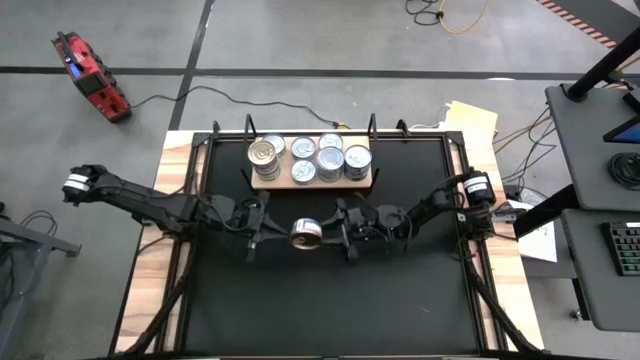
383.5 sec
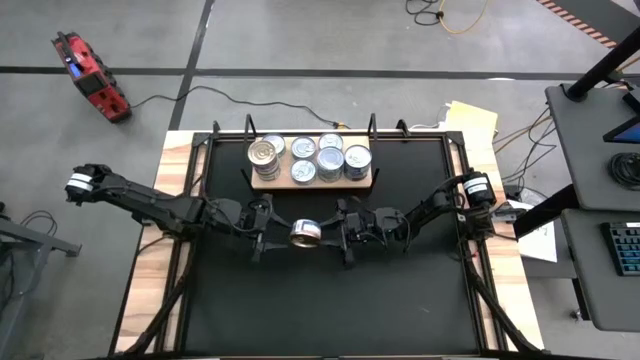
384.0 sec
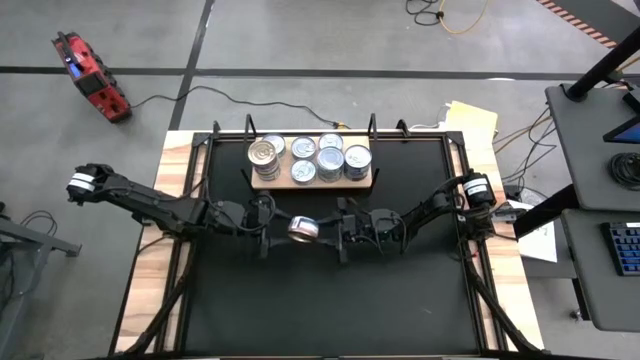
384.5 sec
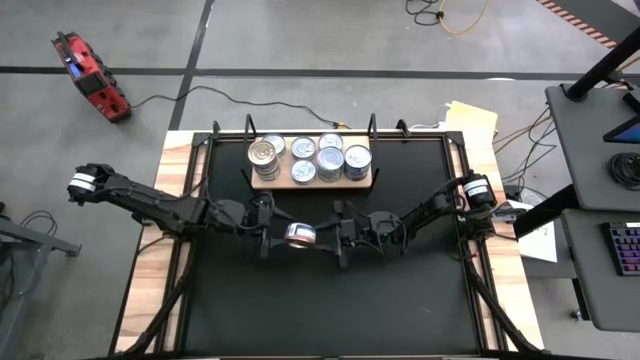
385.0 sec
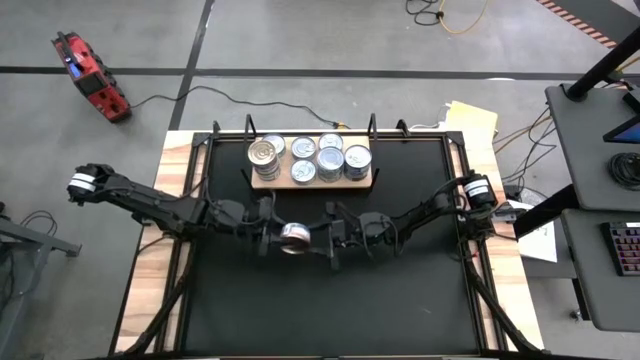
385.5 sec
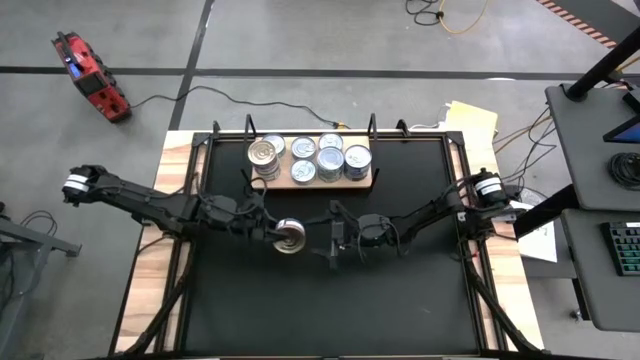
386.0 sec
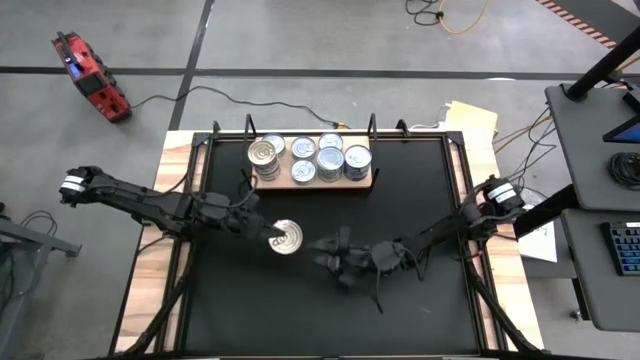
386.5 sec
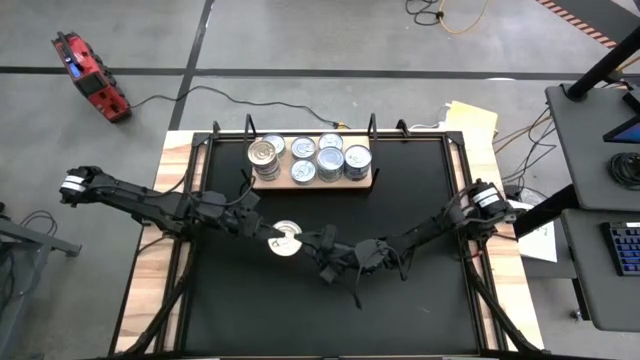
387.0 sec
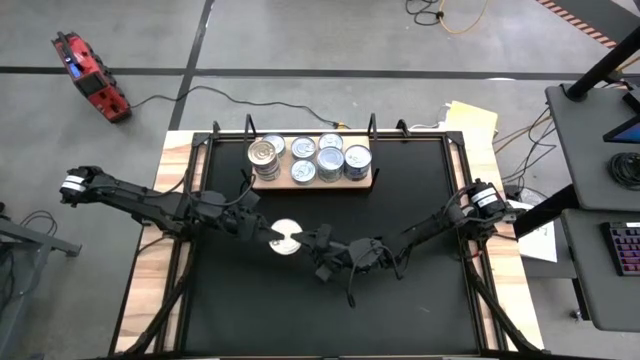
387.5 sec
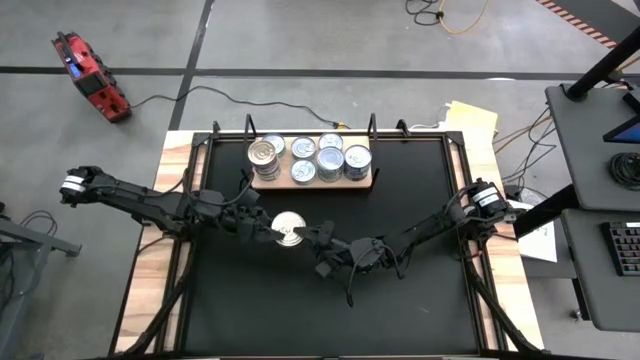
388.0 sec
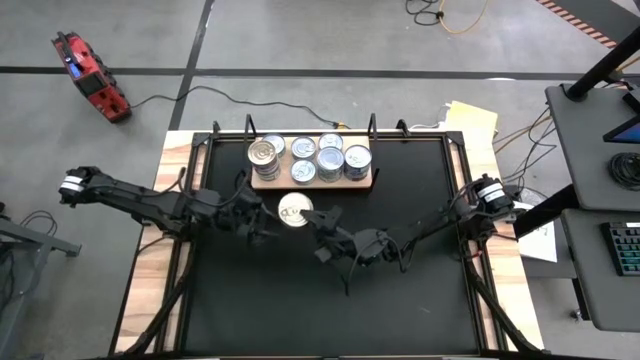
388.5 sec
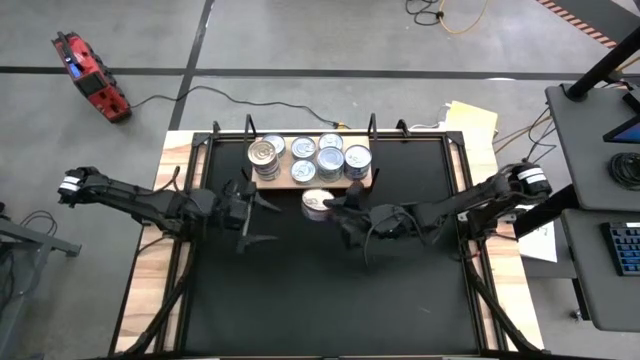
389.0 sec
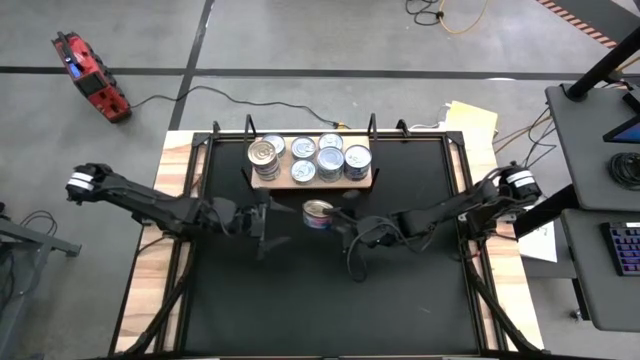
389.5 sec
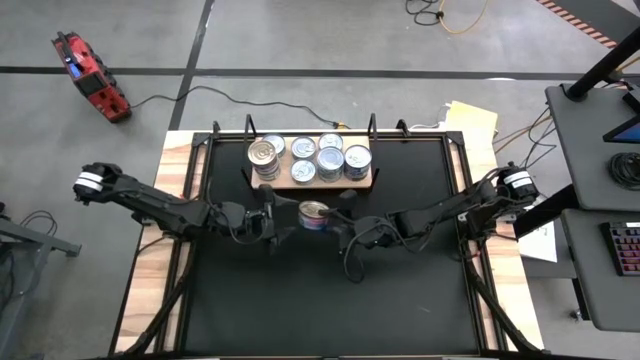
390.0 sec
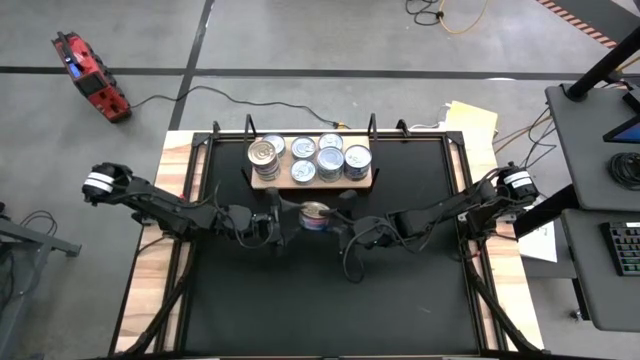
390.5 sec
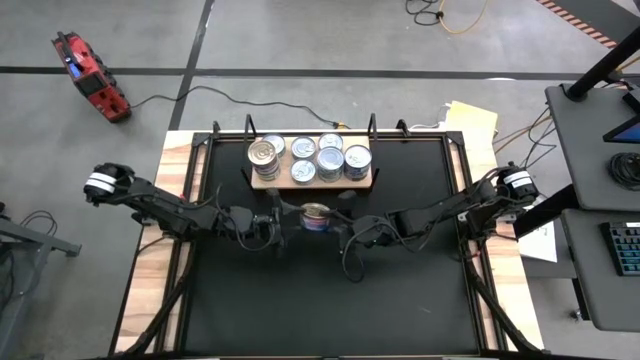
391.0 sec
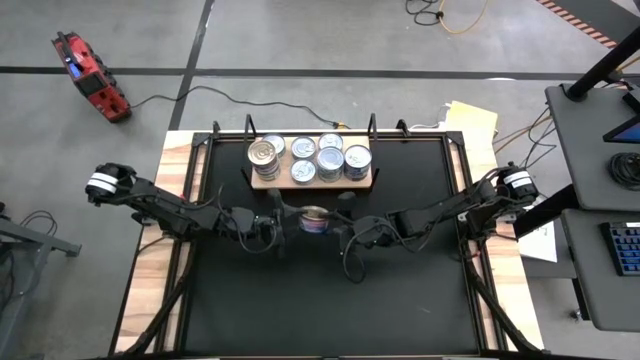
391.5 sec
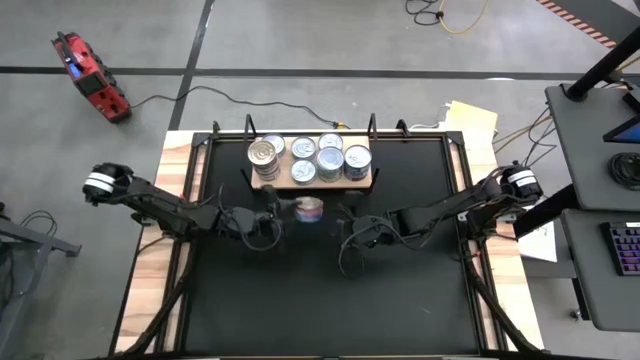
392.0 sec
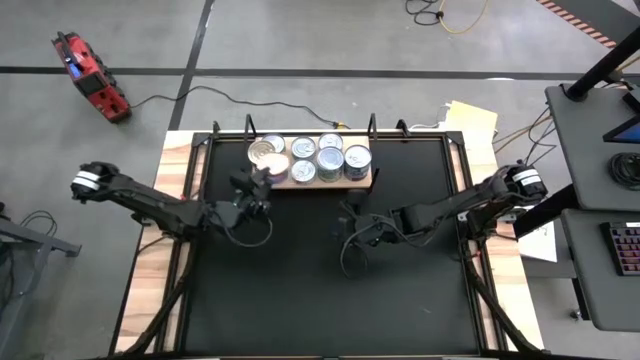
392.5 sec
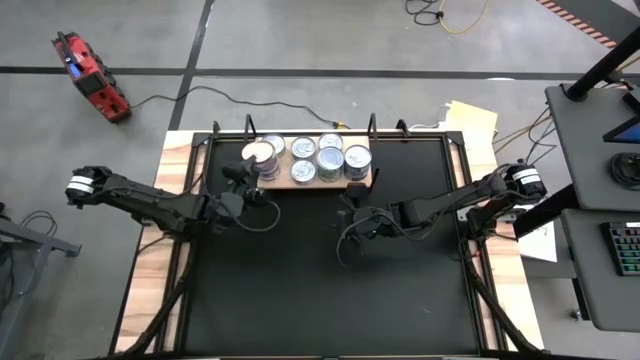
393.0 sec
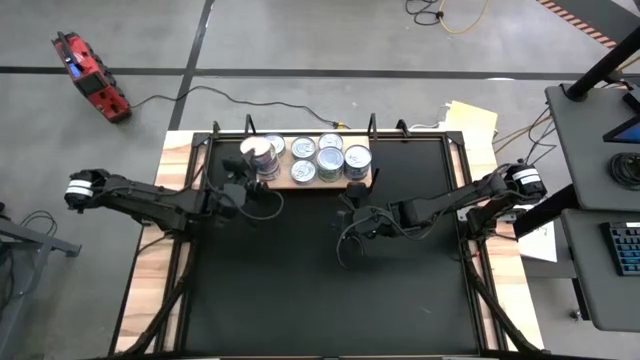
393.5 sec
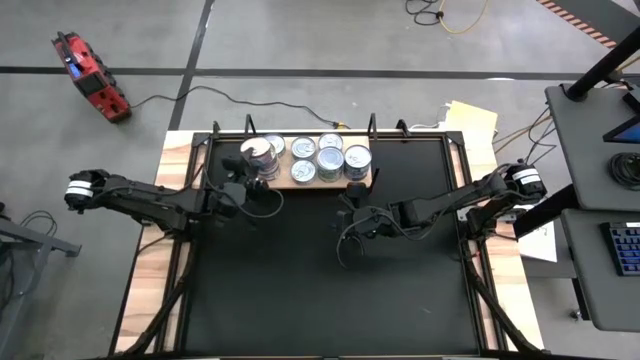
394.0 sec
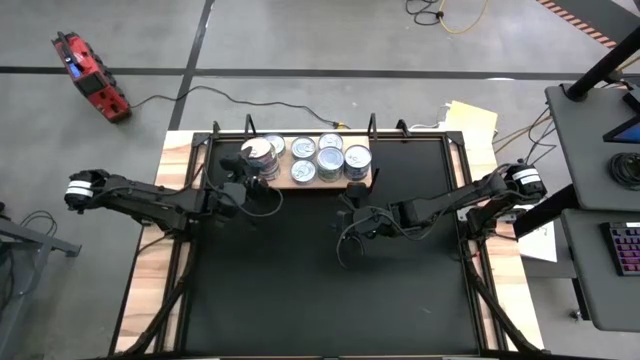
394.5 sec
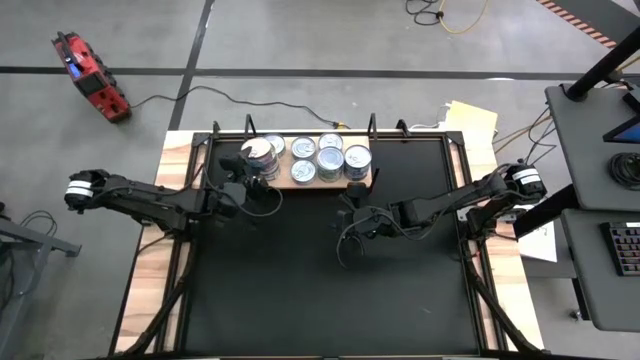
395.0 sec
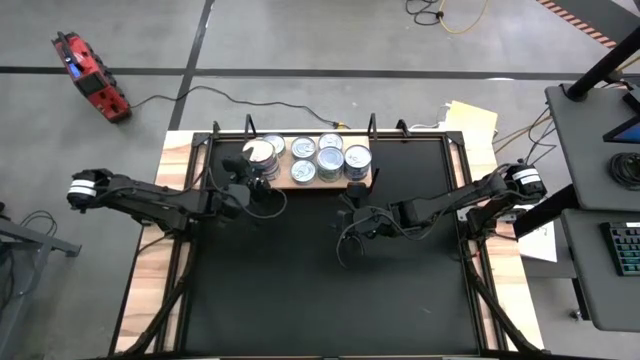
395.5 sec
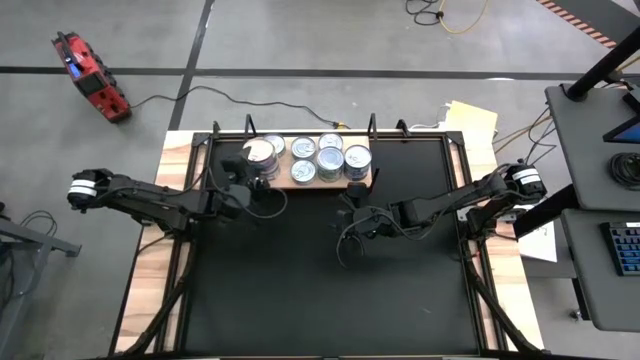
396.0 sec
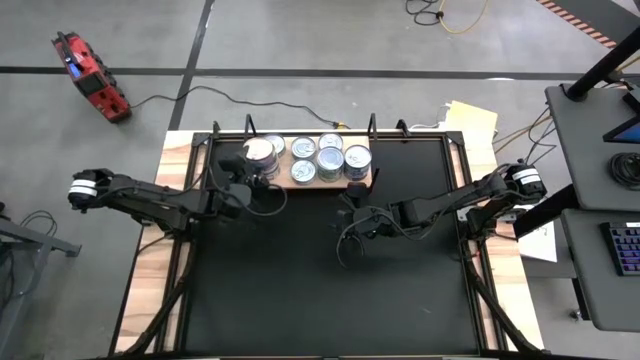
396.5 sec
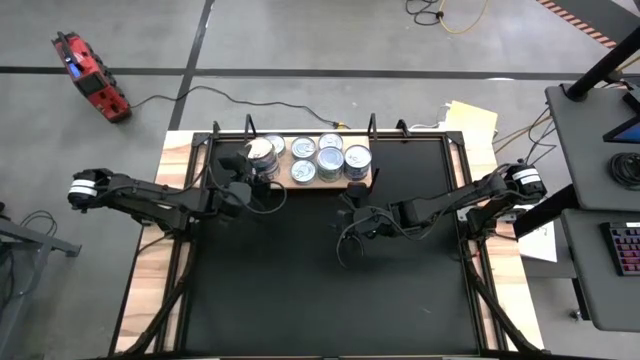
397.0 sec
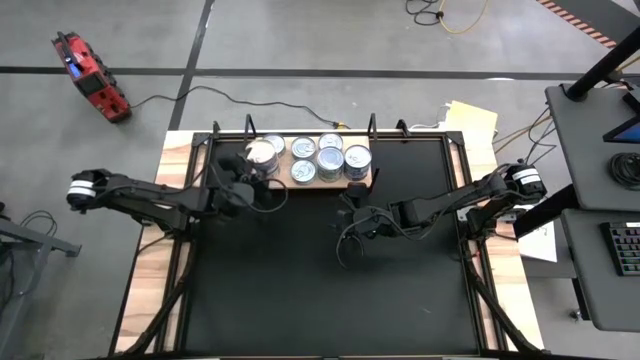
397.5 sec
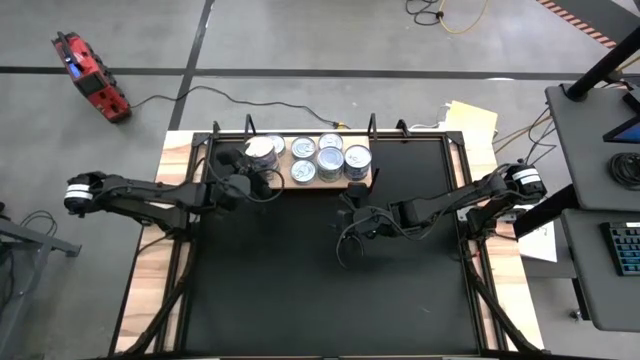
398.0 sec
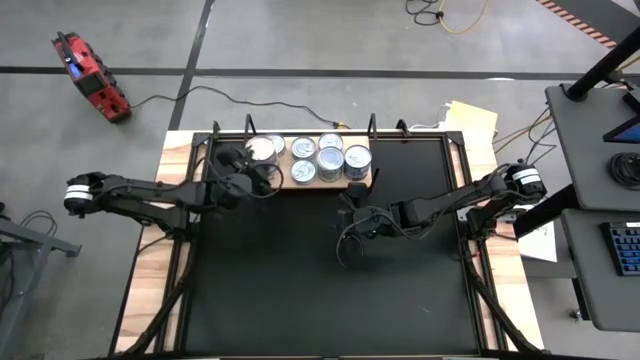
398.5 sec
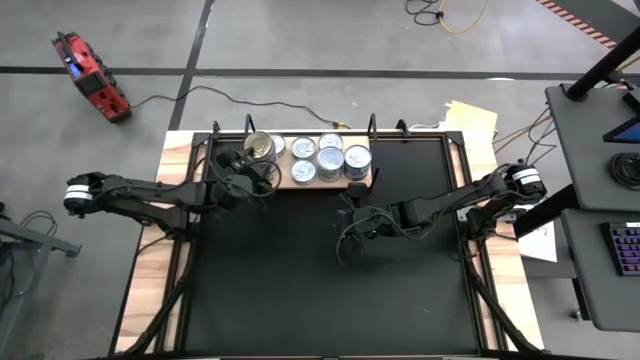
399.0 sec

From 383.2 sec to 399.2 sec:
Task: Stack canned seafood by type on shelf
Stack the blue tuna can on top of the other blue tuna cans on the shelf

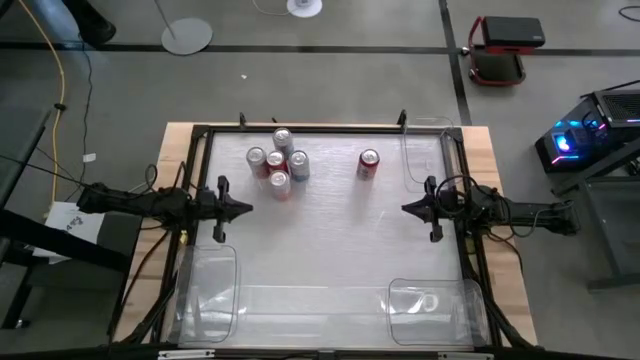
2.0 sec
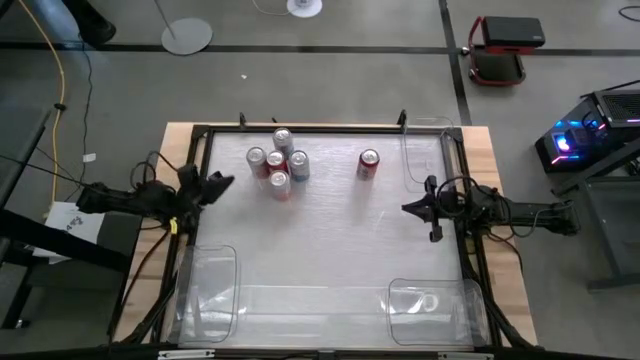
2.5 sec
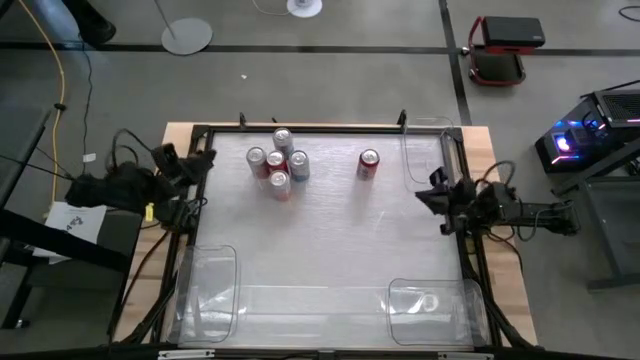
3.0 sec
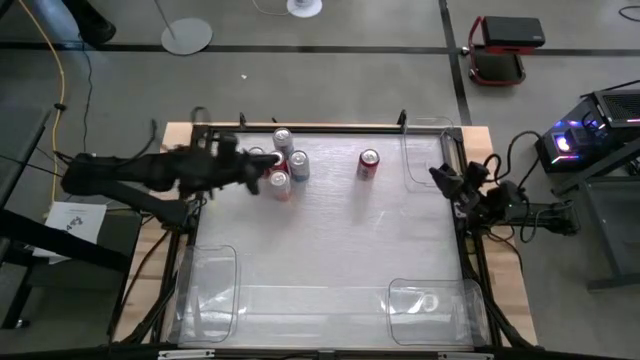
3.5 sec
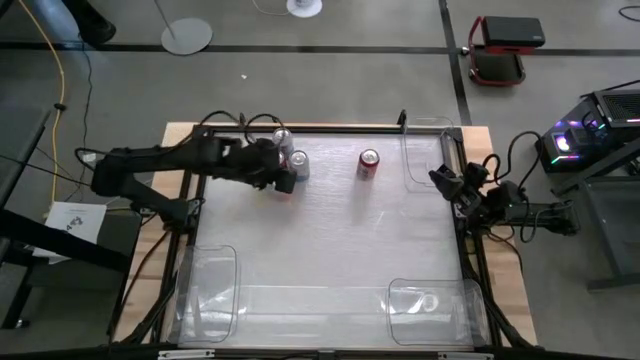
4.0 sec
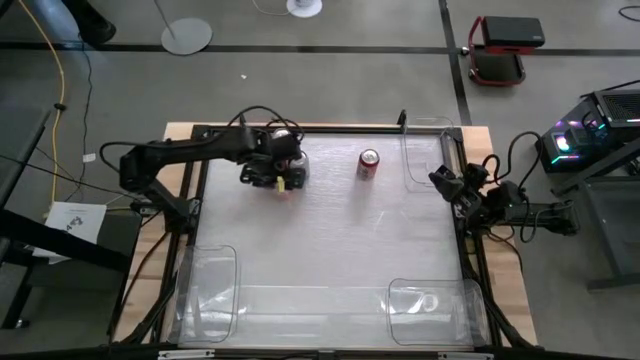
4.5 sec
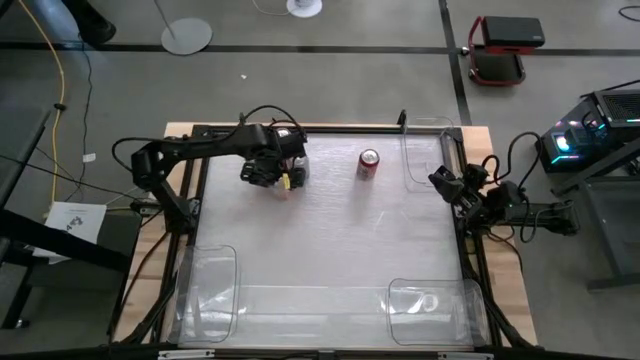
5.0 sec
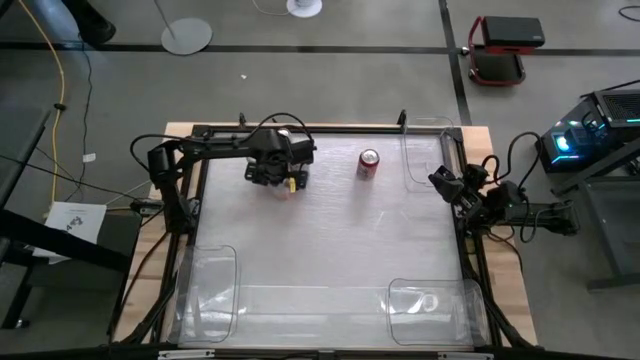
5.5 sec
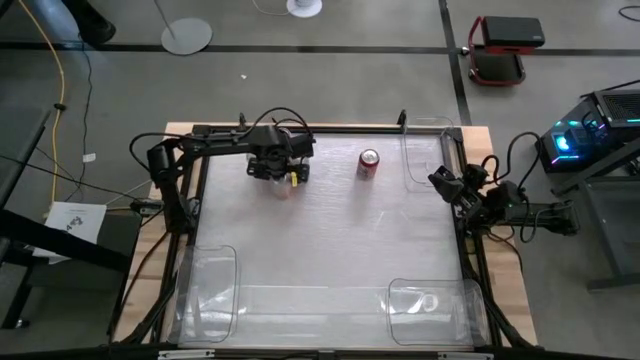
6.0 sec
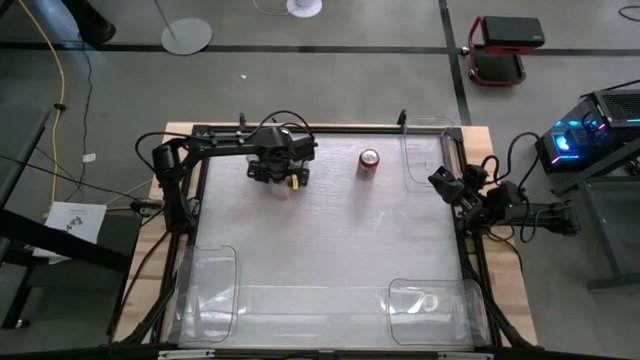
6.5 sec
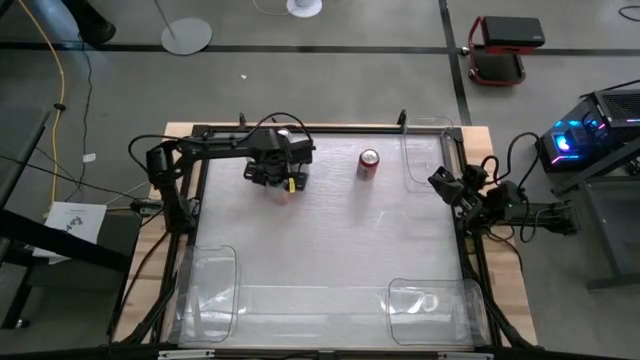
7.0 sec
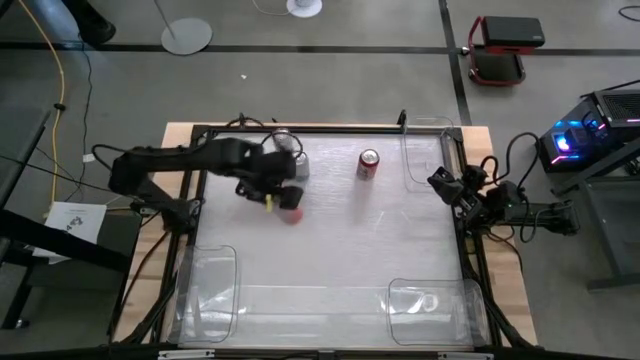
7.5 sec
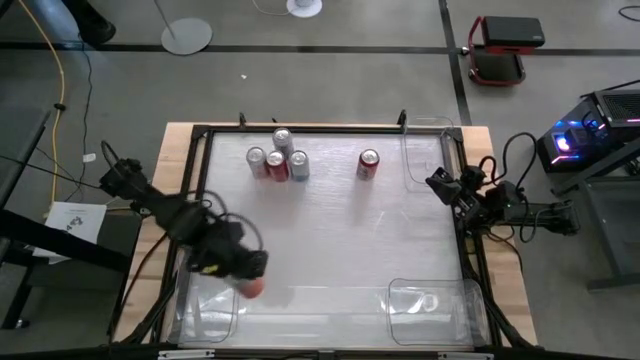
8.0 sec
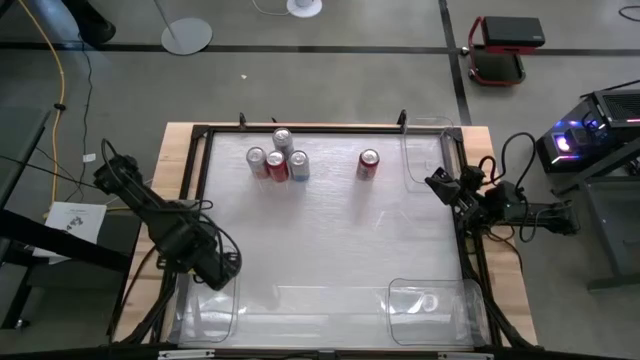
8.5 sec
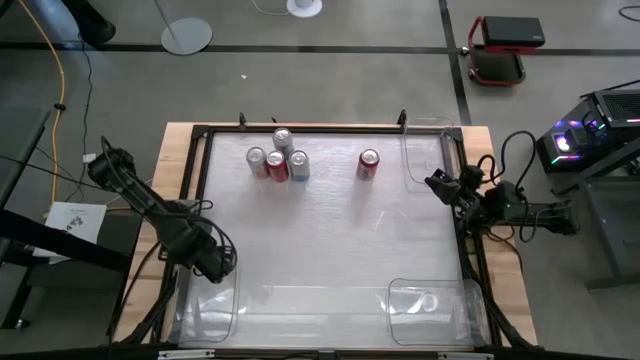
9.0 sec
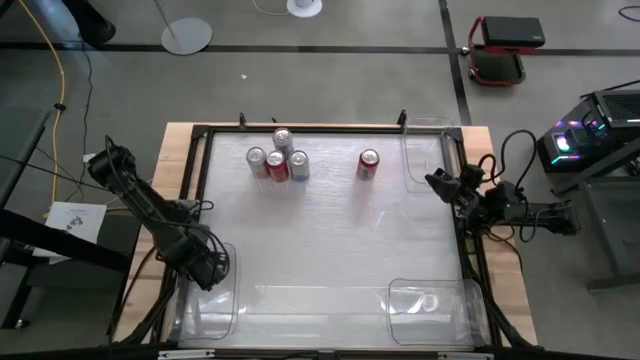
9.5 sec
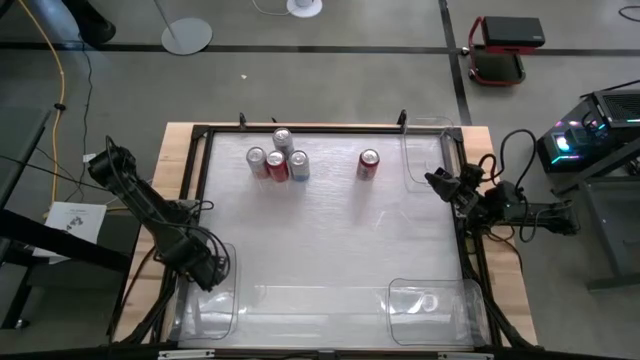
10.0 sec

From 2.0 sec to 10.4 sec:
Task: Sort soda cans
Put the bottom orange-white soda can into the bottom left transparent bin
